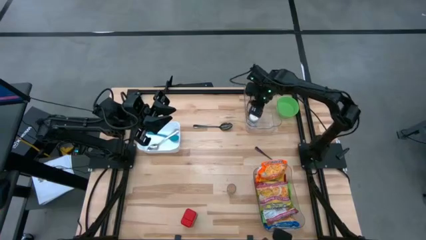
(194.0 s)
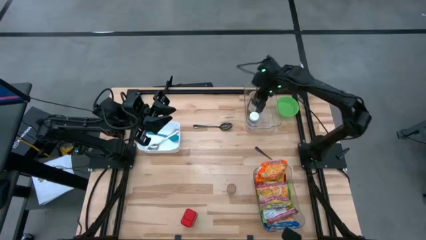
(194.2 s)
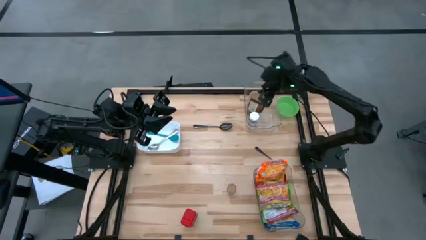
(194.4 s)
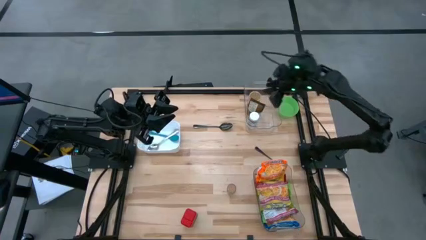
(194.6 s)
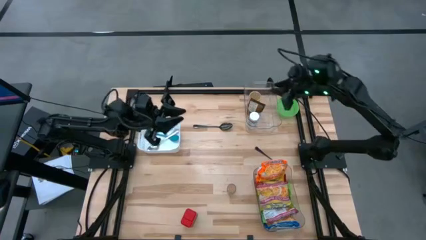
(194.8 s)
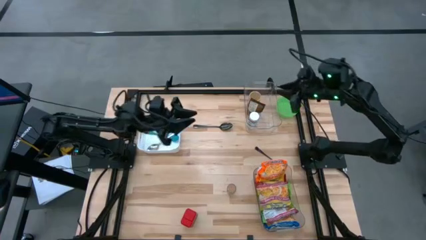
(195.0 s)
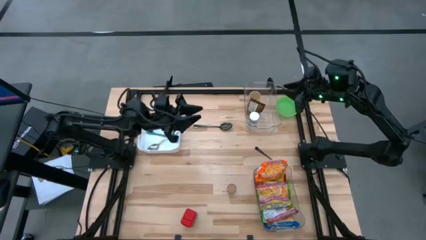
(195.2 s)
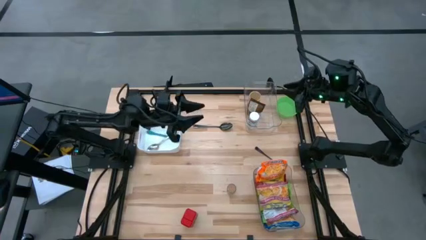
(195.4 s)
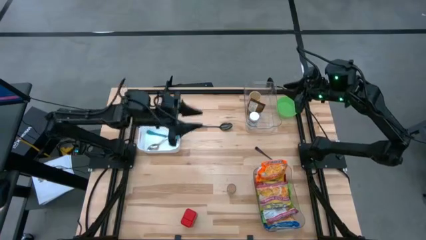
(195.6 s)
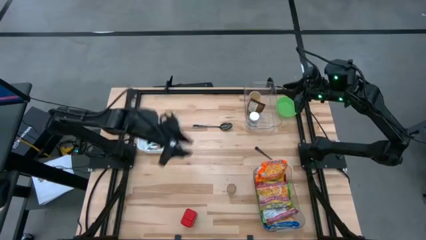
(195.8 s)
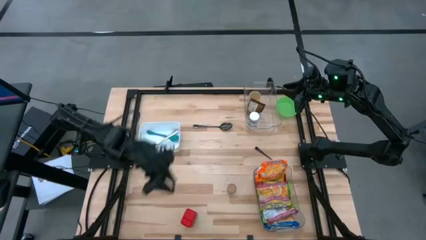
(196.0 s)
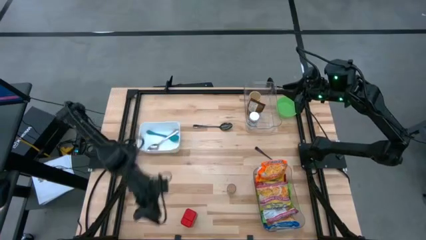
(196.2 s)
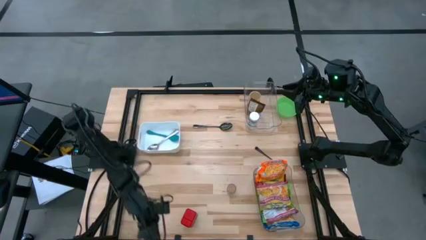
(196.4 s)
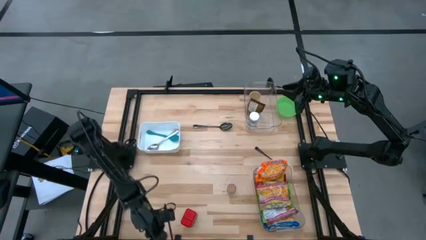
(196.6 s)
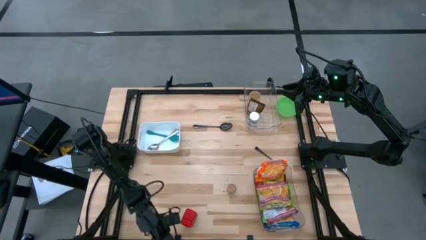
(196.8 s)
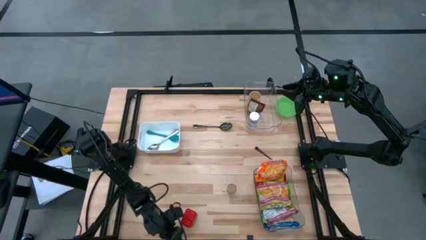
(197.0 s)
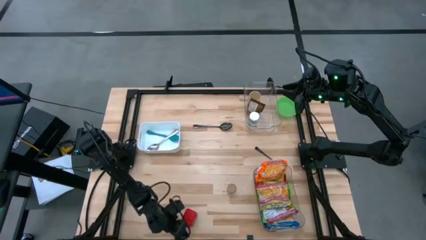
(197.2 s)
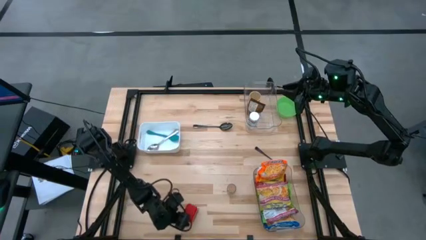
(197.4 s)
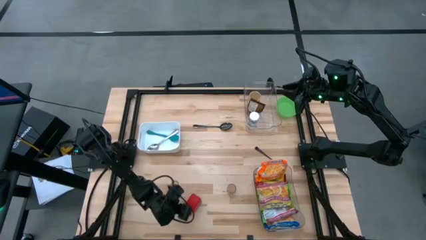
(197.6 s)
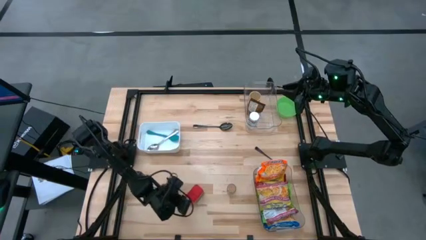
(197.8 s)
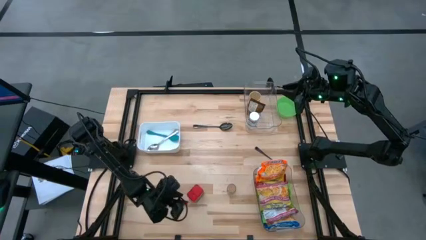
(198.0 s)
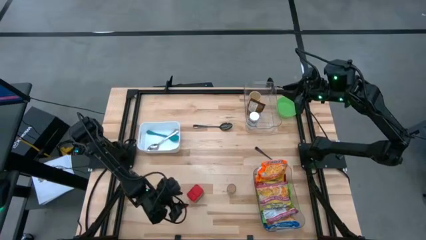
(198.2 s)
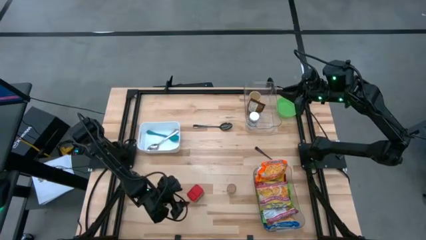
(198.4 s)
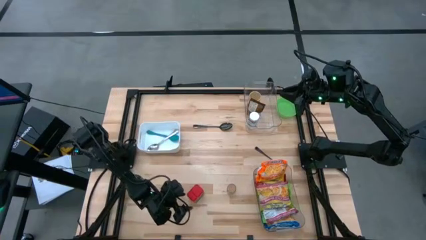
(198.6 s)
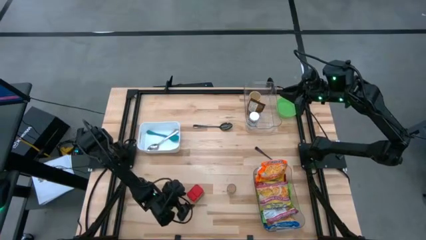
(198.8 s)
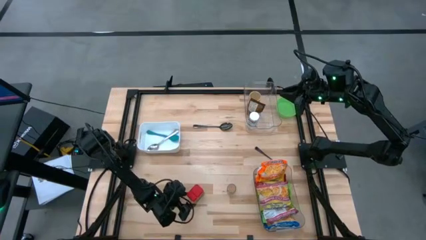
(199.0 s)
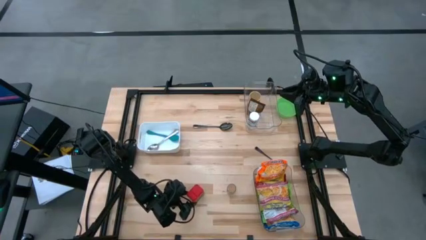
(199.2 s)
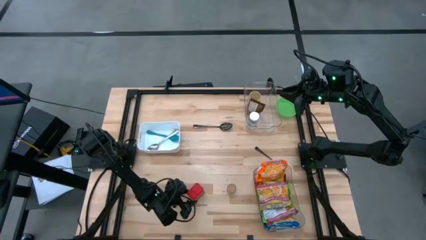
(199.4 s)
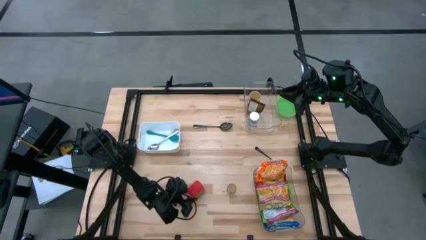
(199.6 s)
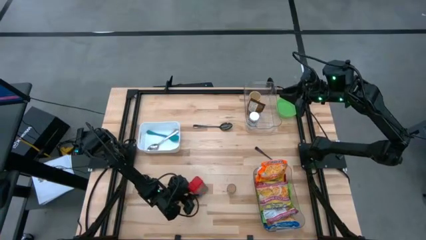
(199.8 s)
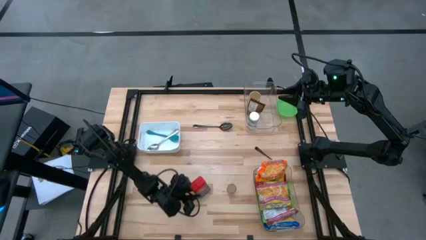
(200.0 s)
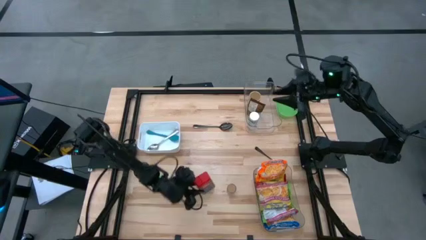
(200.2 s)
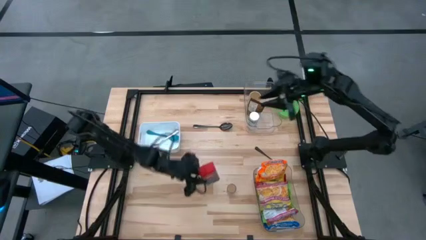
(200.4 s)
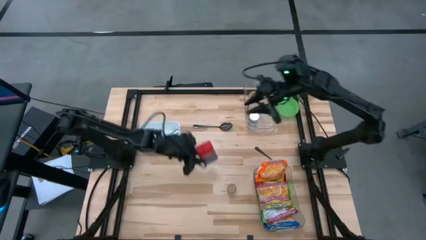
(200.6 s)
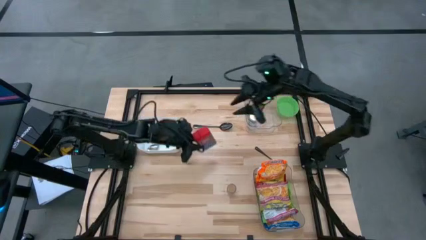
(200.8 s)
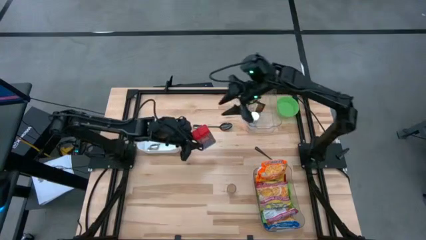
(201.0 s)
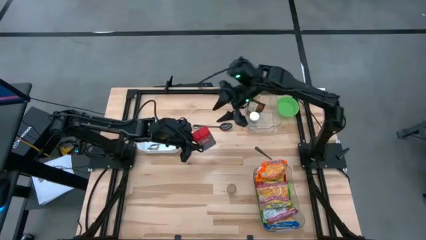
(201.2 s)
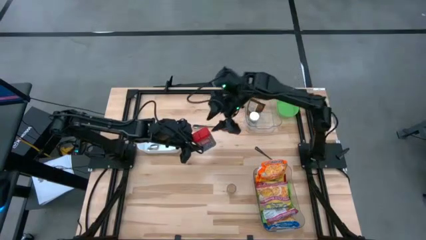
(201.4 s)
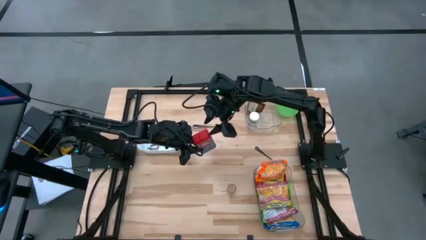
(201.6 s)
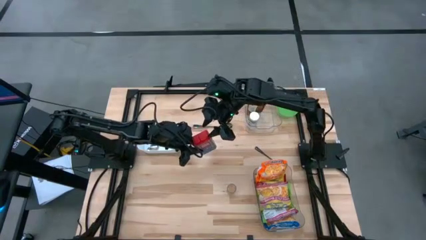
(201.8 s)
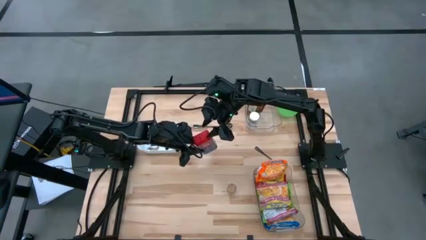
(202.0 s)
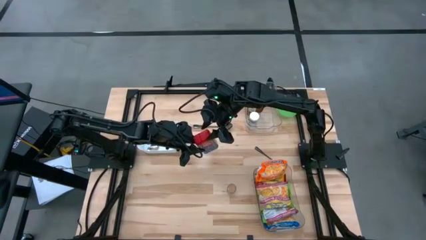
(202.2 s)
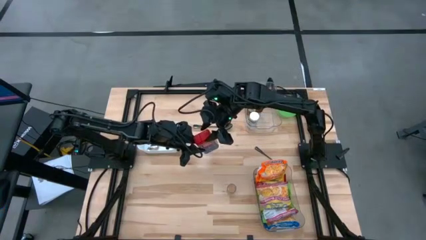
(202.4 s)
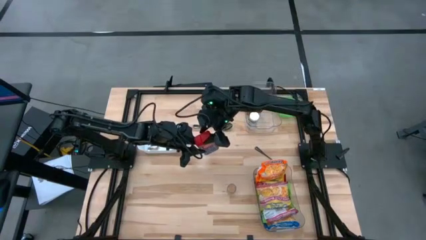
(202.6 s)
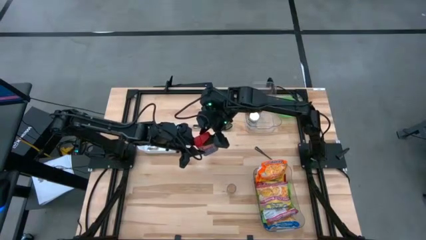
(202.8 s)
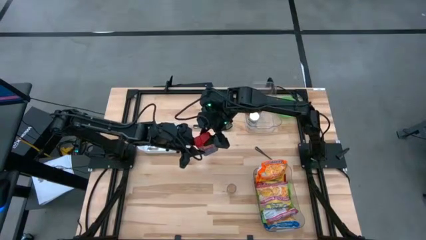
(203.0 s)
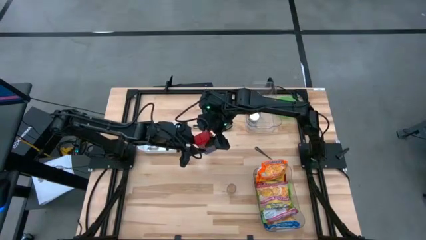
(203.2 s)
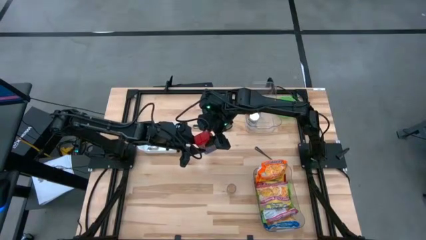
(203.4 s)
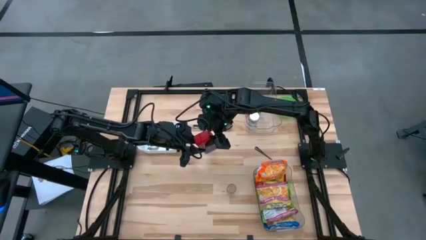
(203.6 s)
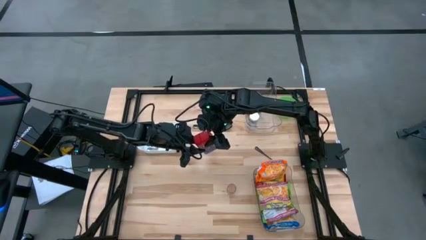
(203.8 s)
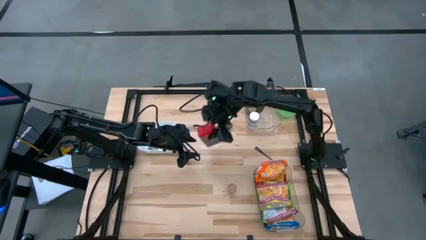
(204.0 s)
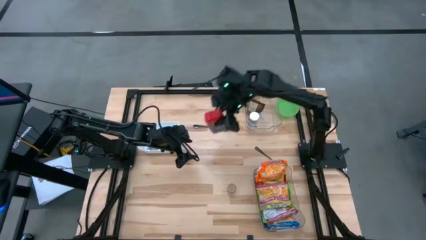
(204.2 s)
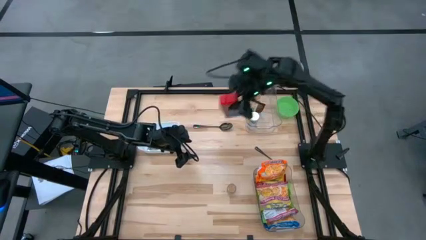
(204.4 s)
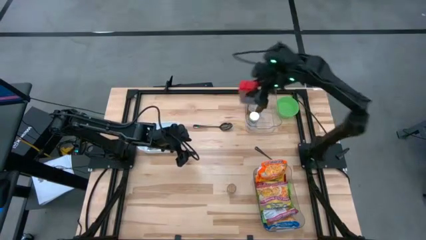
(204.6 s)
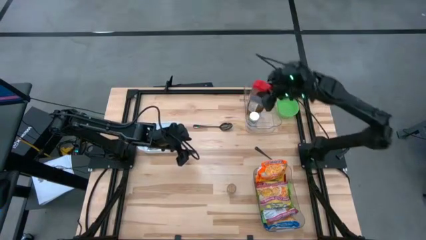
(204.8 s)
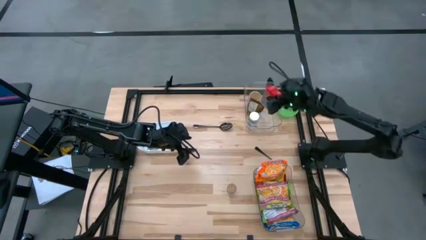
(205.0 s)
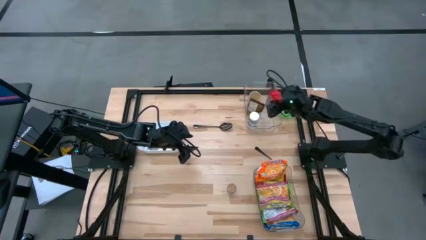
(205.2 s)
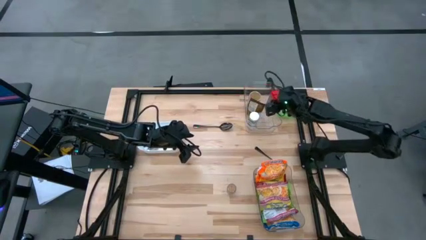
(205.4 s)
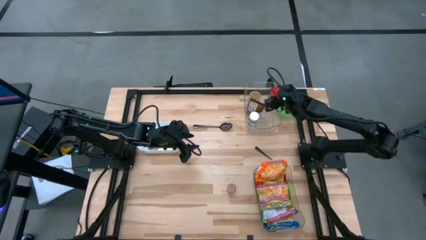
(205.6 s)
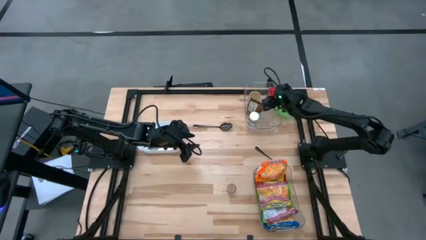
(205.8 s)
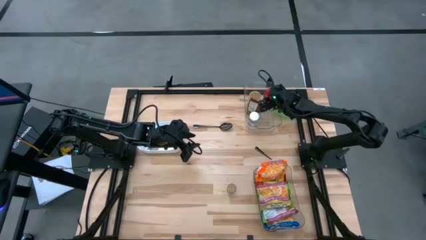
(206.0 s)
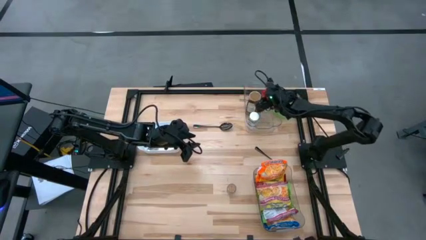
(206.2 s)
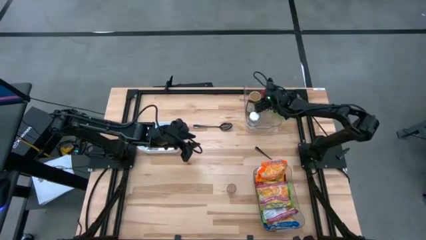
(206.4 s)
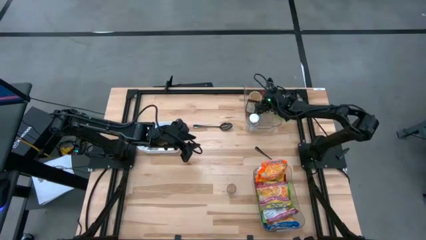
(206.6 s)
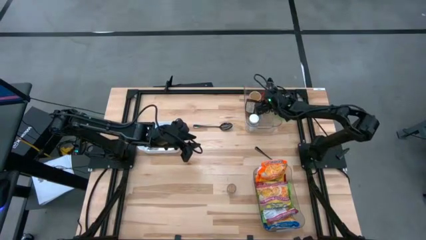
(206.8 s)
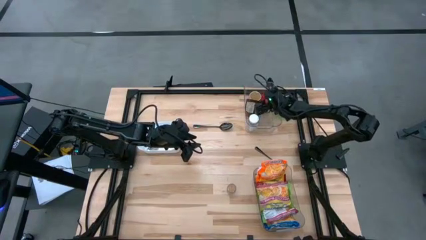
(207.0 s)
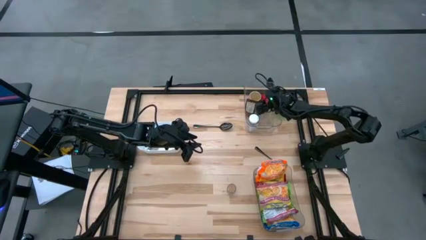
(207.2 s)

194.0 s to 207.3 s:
Task: Pick & Place Food Item
Put the red seasoning can into the top transparent bin

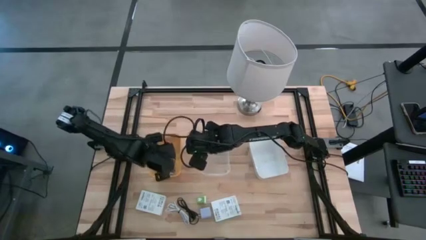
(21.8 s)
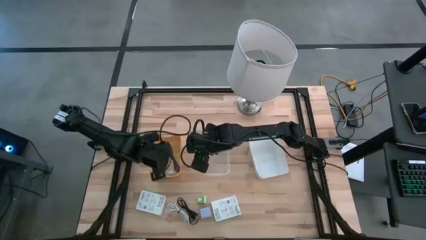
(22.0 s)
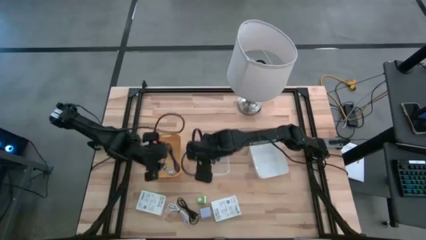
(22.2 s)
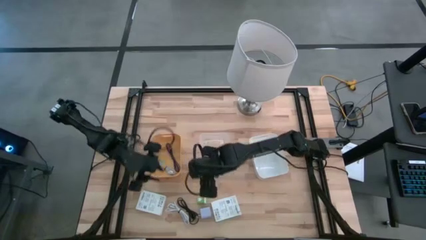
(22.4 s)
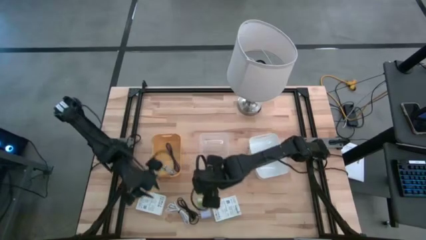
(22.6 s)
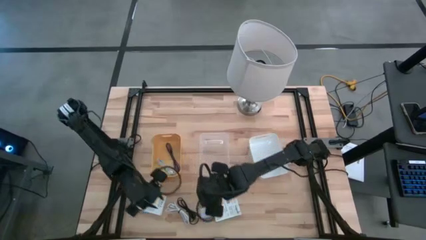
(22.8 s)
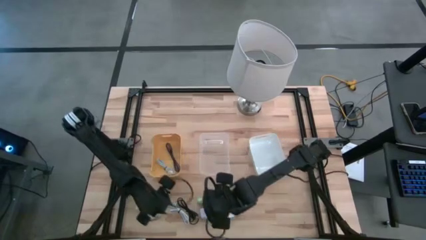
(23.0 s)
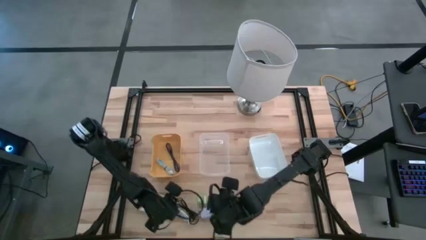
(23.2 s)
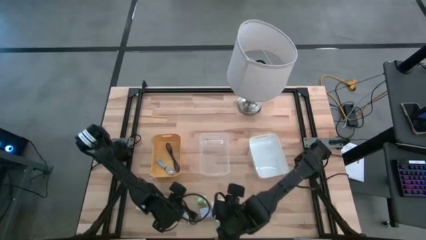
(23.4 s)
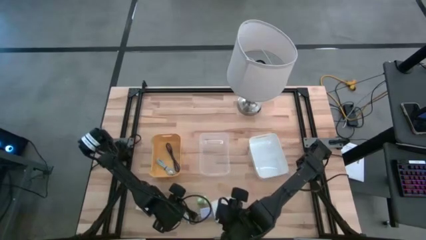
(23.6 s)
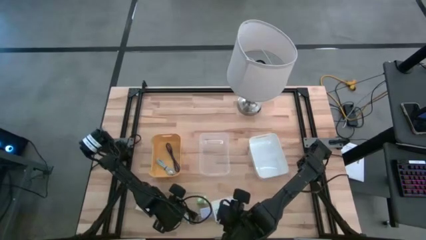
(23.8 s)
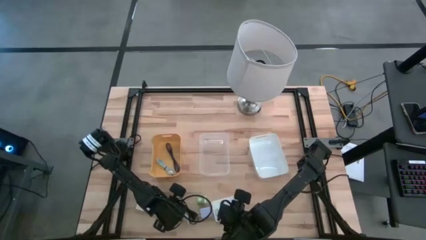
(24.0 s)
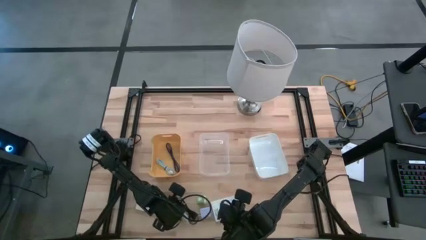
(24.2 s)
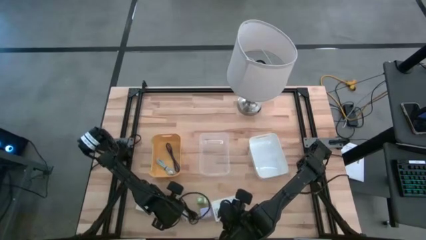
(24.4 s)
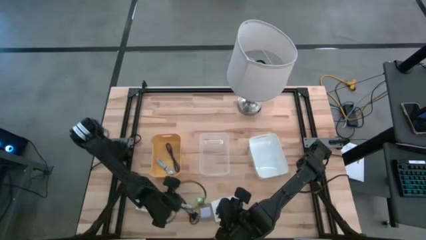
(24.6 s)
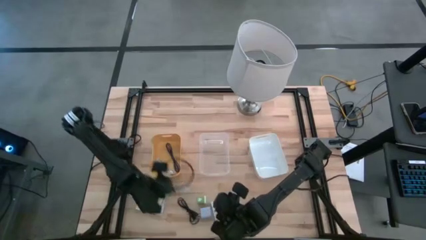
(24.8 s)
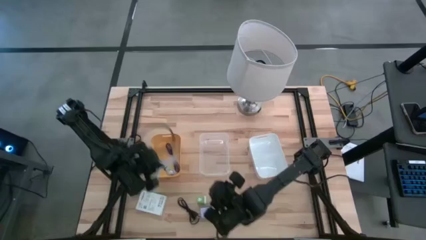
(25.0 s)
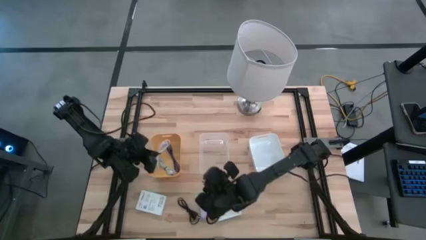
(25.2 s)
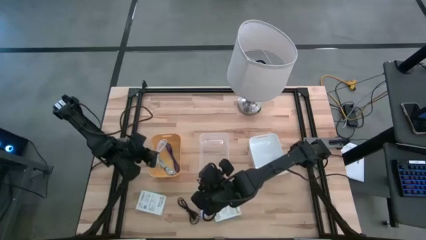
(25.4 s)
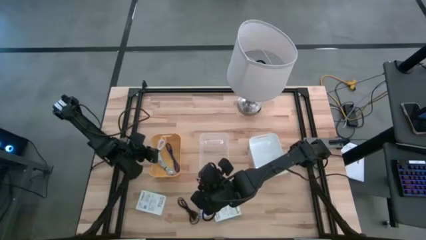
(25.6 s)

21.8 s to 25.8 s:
Task: Pick and place items into bin
Put the white charger cable into the yellow bin
